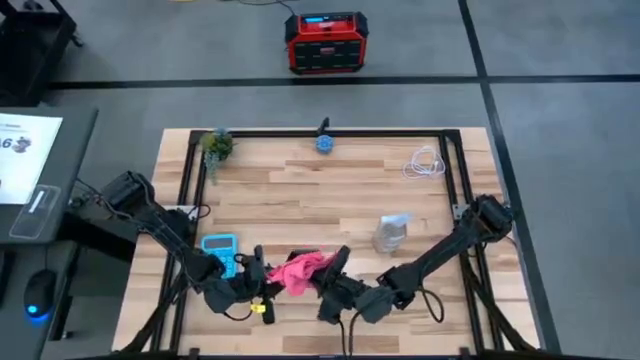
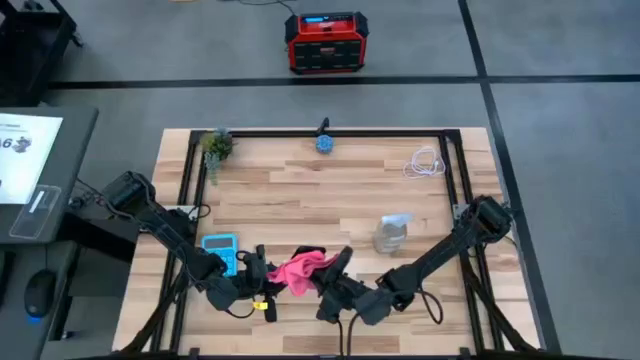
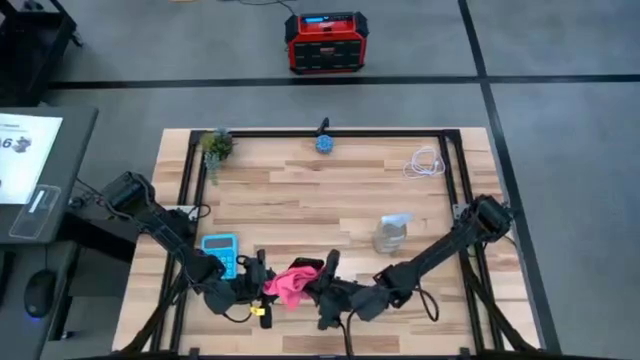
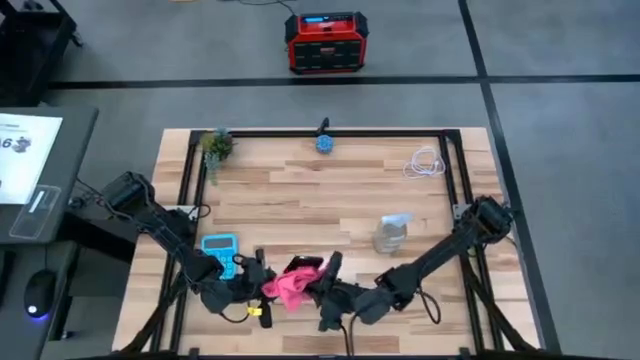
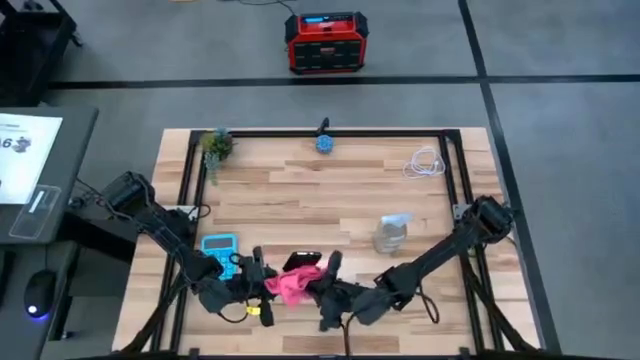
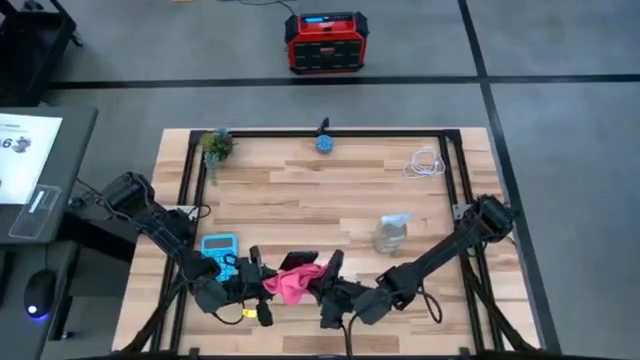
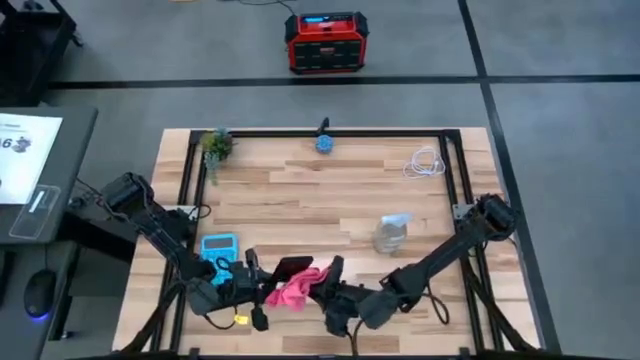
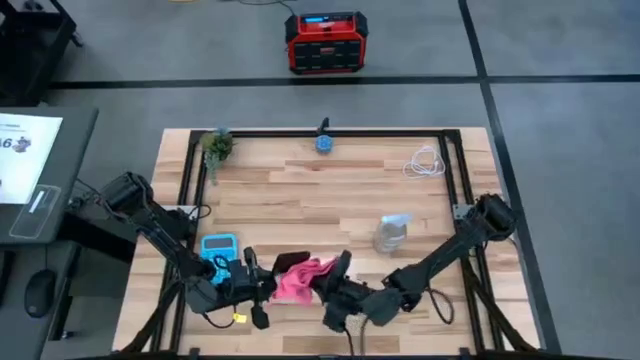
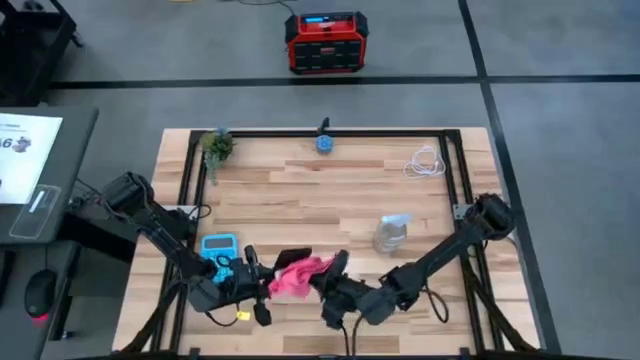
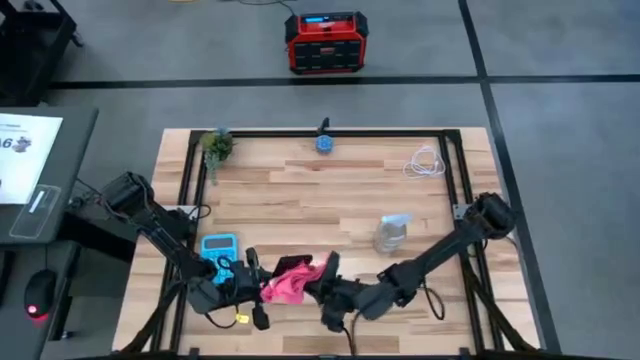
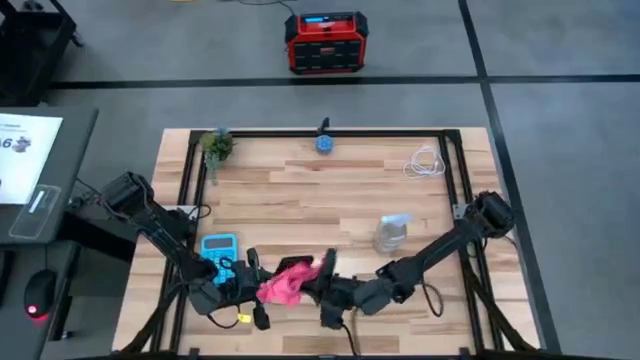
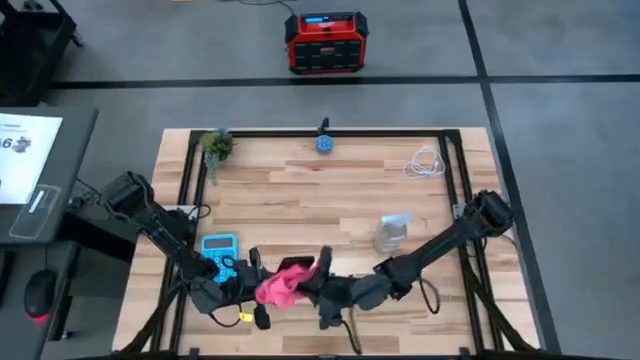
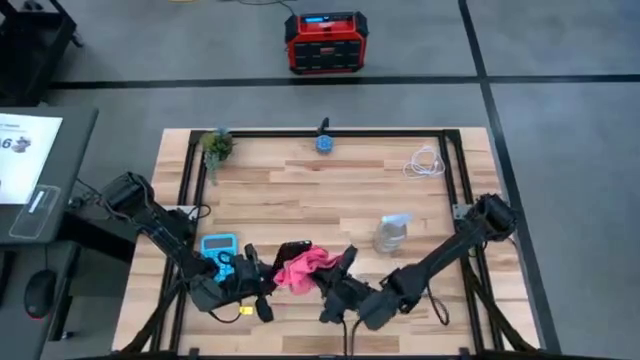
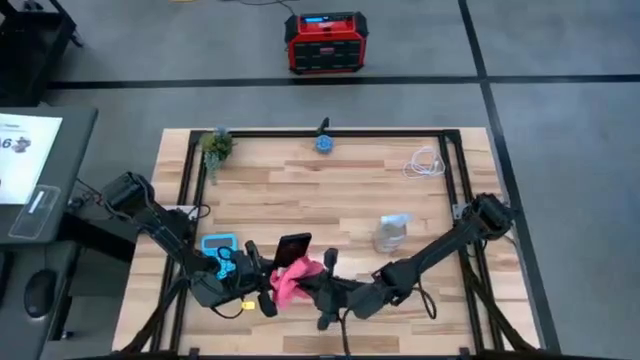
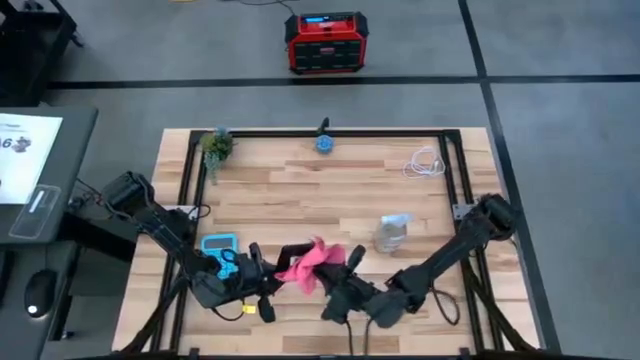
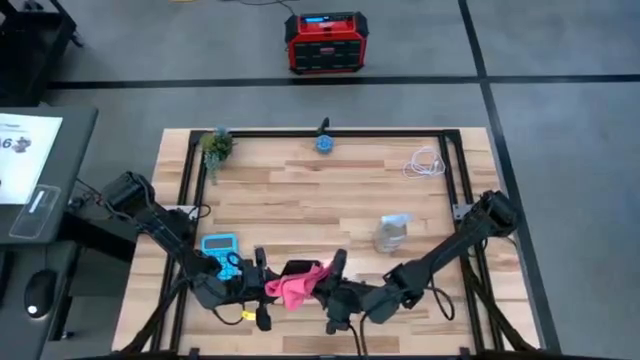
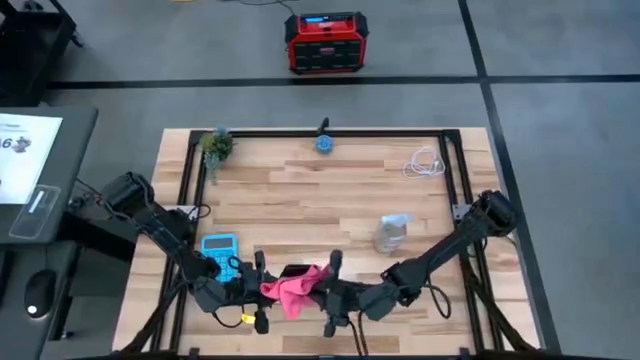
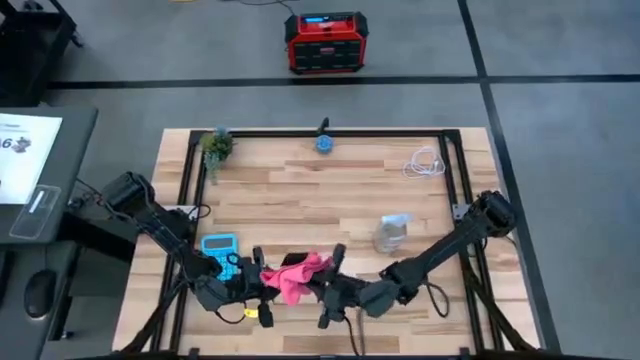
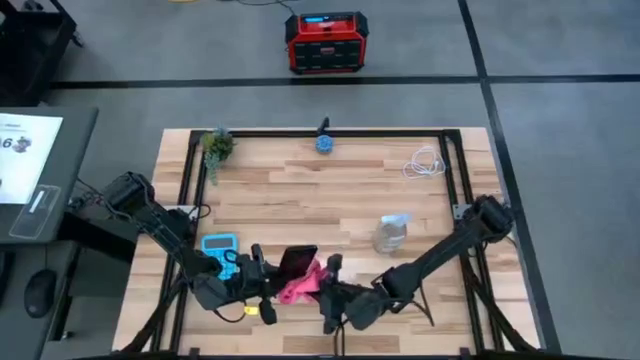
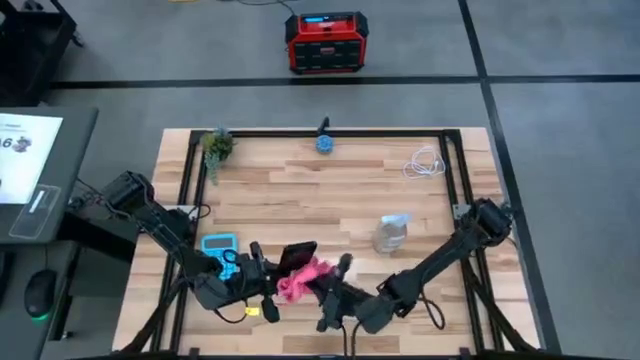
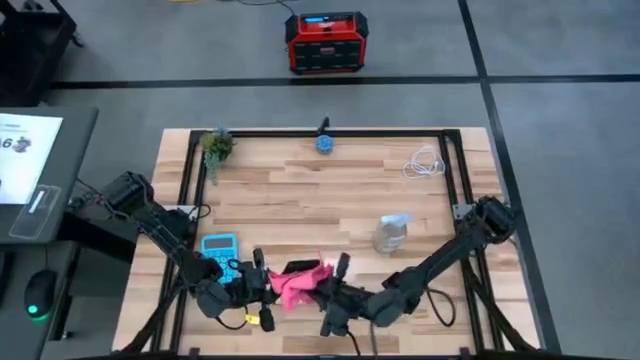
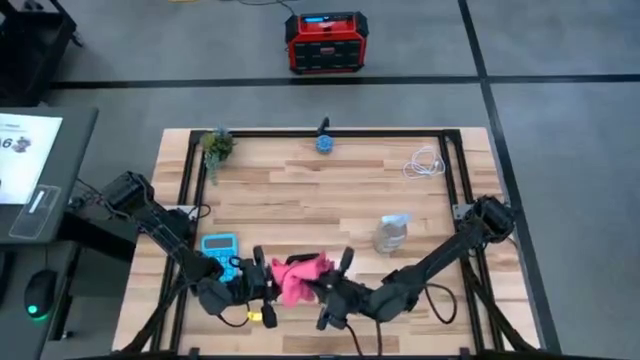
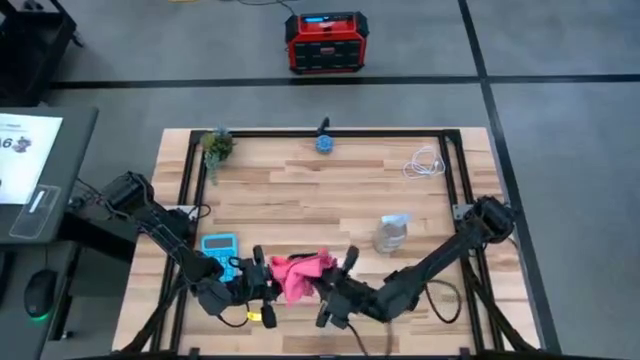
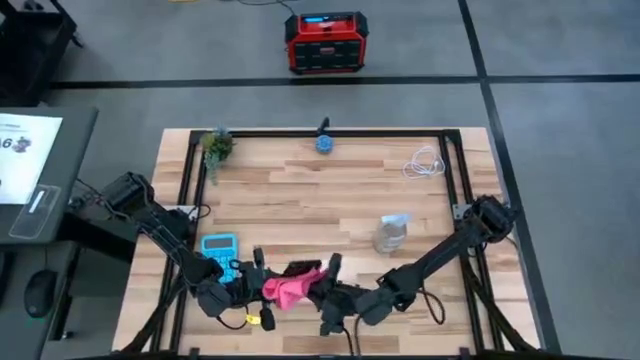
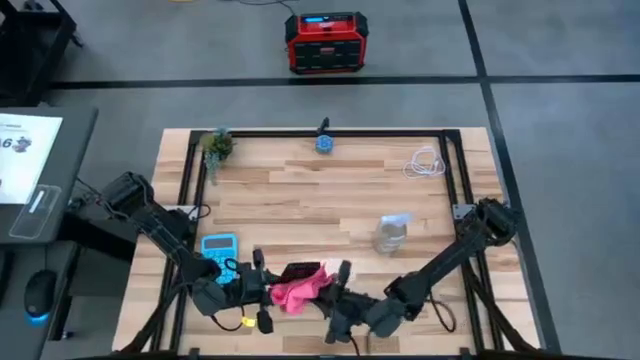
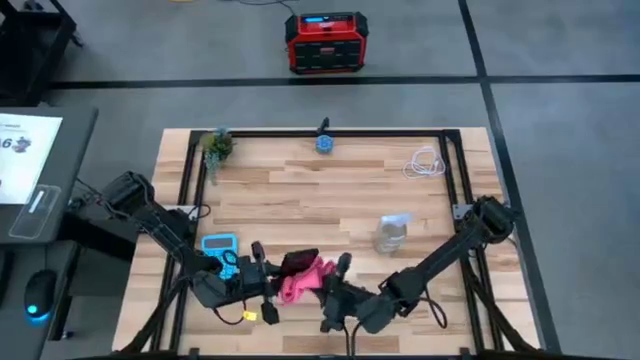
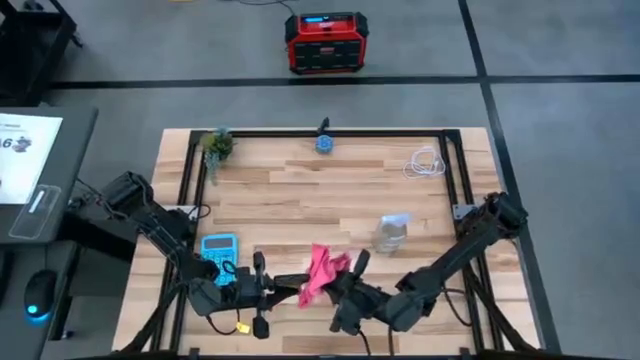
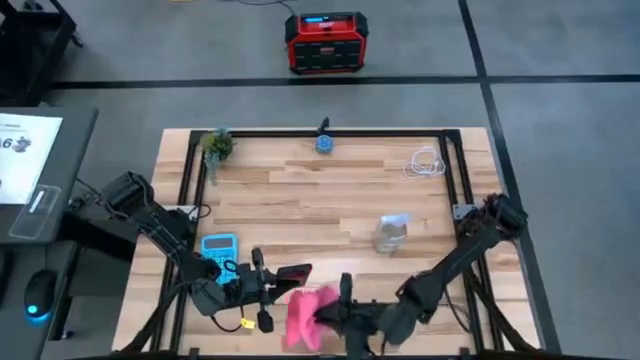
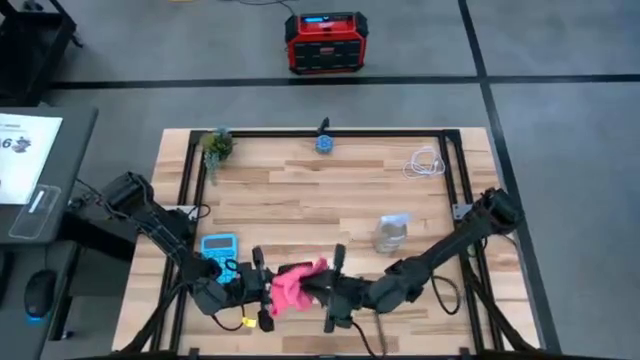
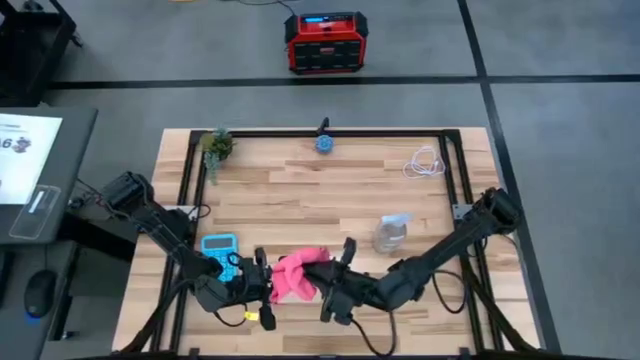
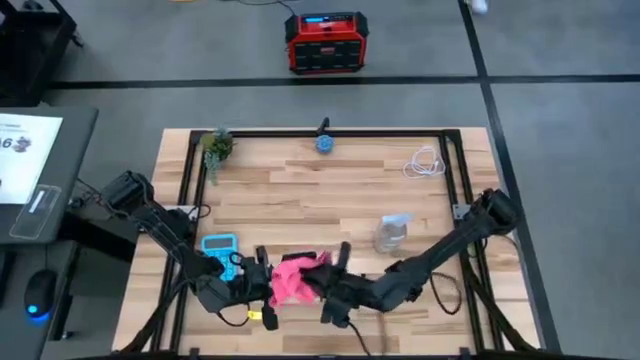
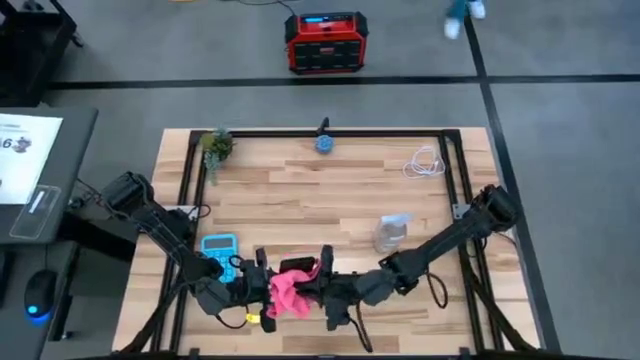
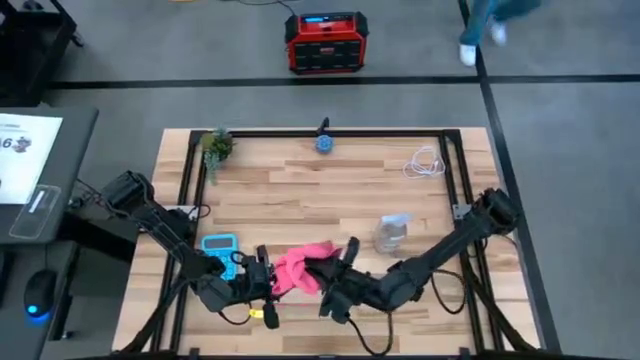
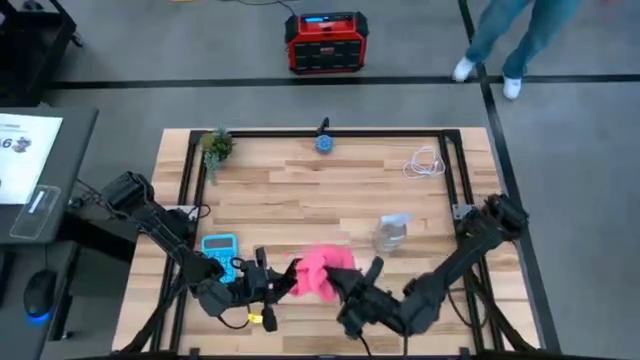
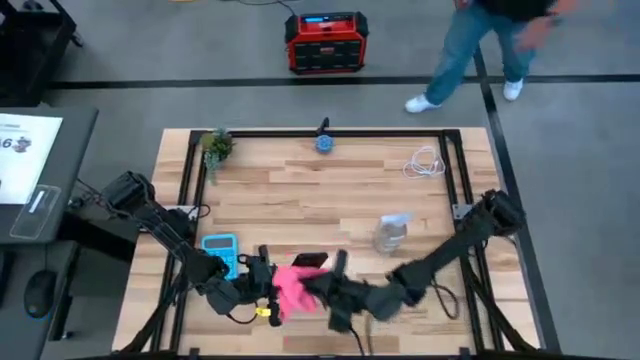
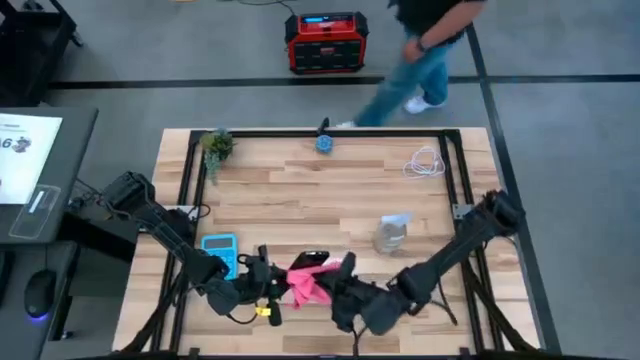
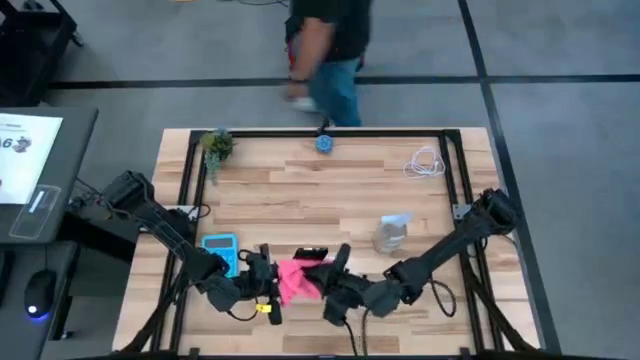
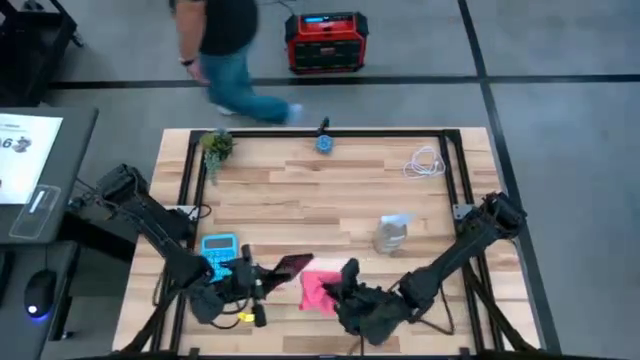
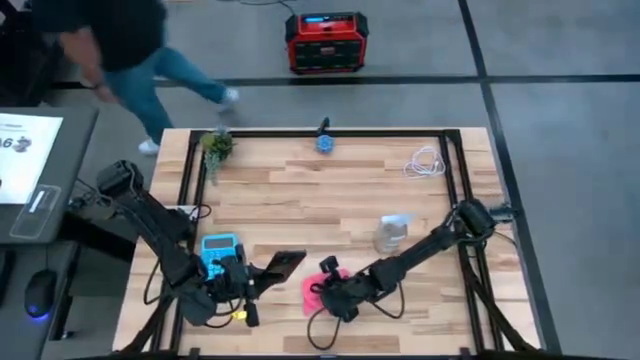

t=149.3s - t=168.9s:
Task: Apply microfiber cloth
Wipe the back of the black cellphone using pink microfiber cloth

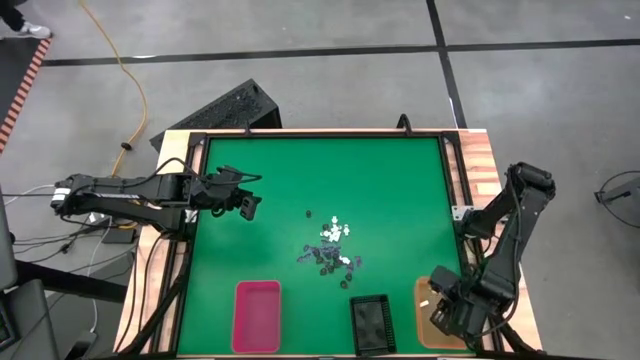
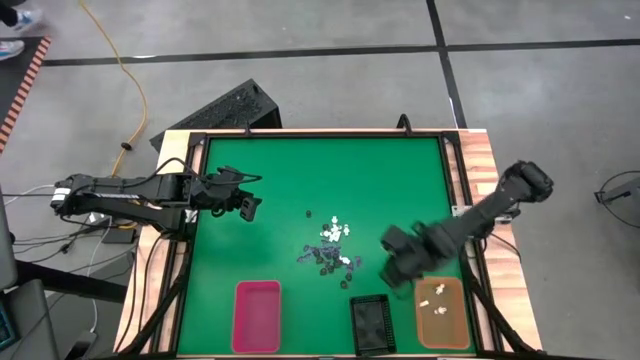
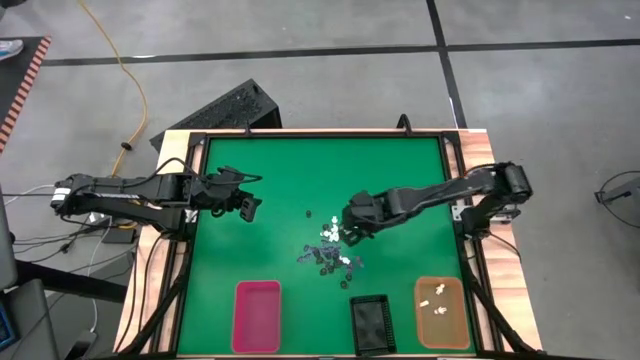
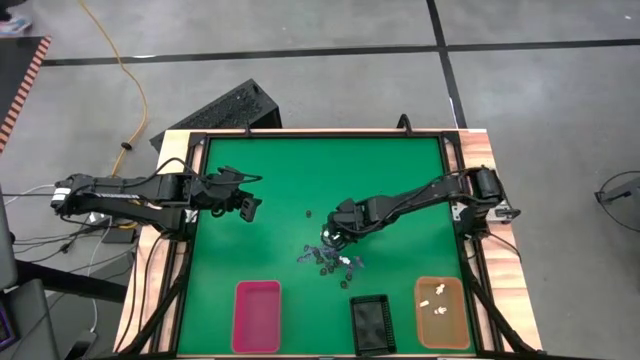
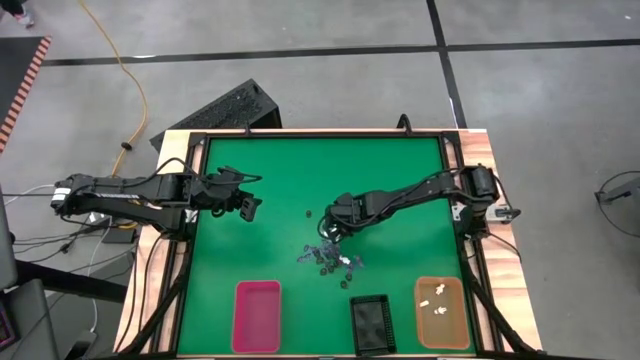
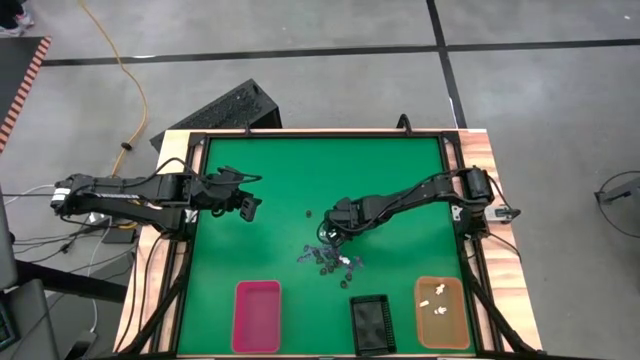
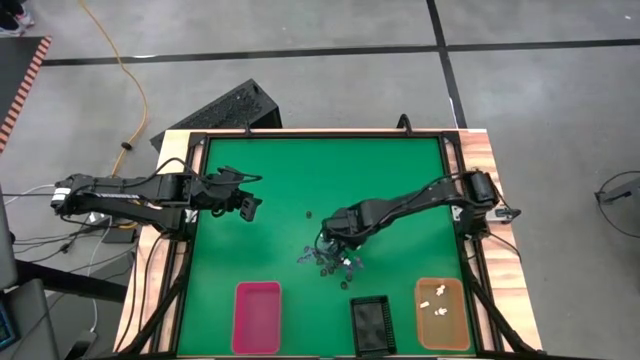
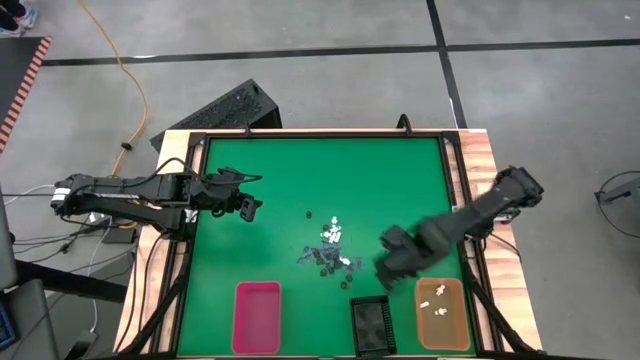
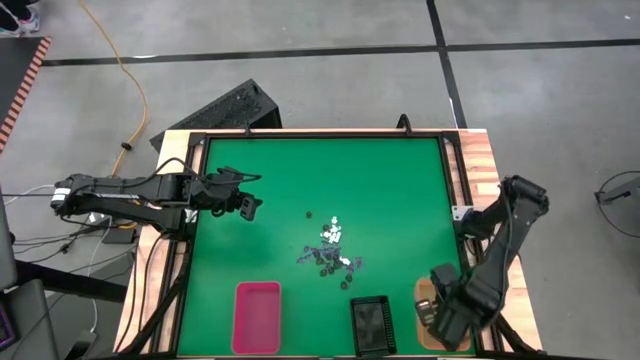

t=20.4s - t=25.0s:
Task: Sort Halloween decoration
Put the white skeleton toy into the right orange organizing bin
